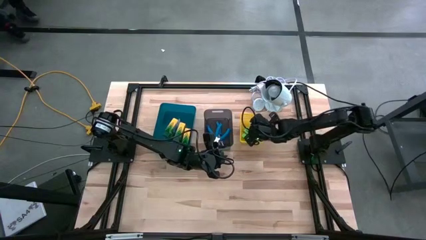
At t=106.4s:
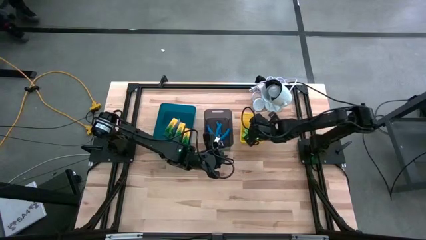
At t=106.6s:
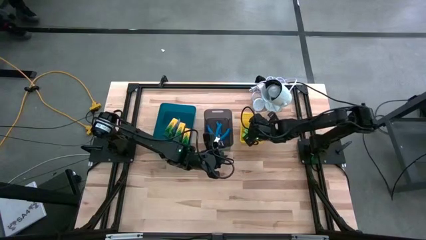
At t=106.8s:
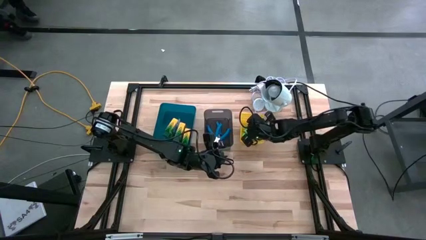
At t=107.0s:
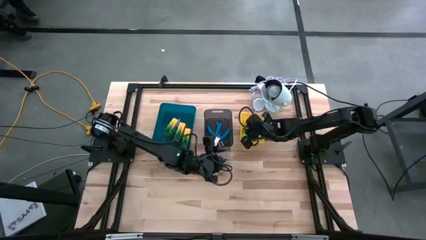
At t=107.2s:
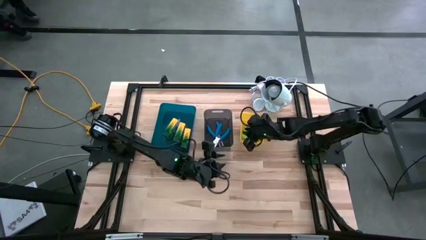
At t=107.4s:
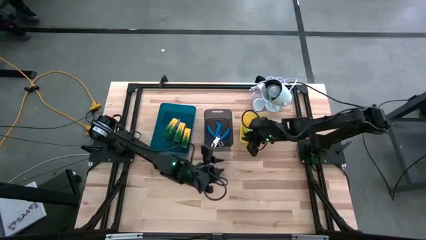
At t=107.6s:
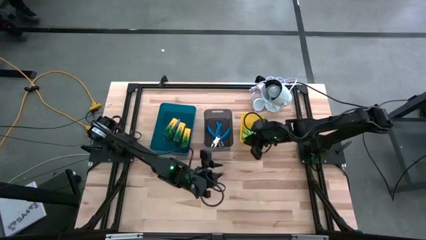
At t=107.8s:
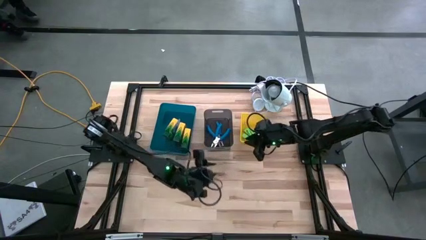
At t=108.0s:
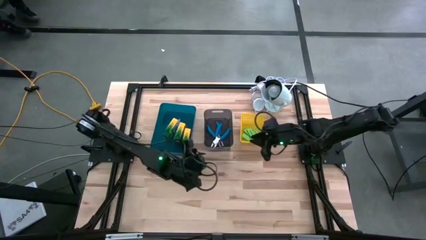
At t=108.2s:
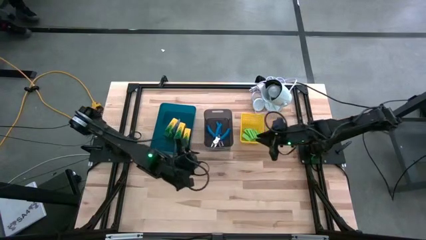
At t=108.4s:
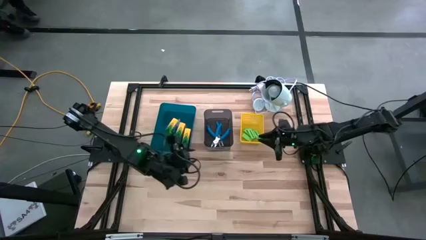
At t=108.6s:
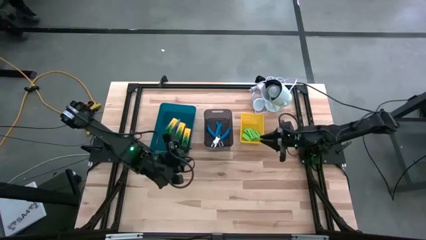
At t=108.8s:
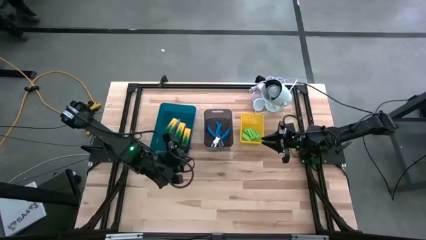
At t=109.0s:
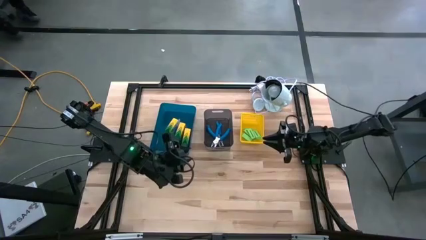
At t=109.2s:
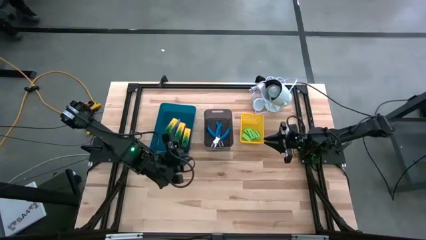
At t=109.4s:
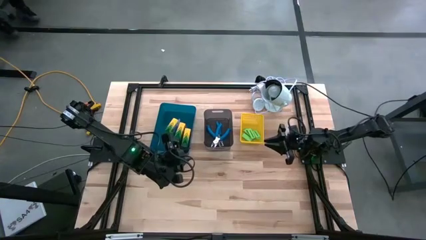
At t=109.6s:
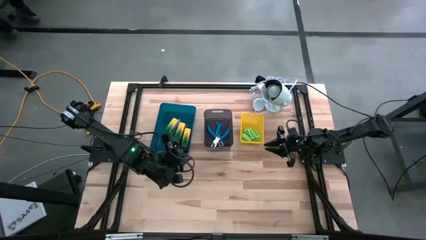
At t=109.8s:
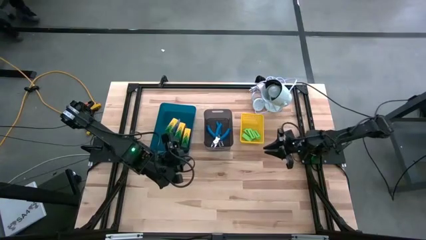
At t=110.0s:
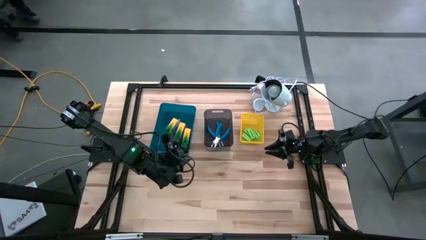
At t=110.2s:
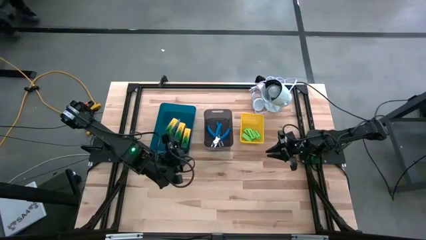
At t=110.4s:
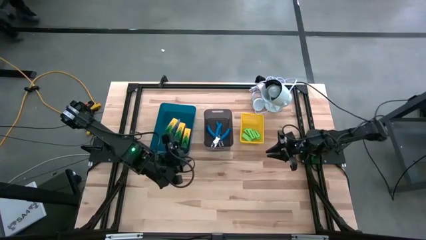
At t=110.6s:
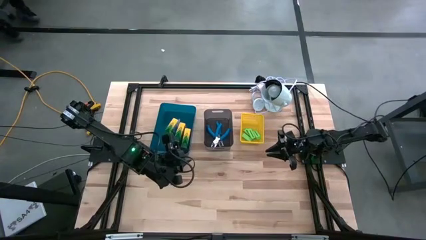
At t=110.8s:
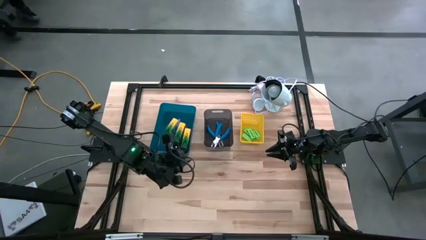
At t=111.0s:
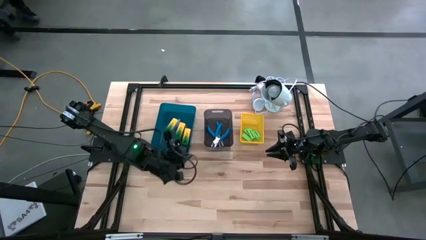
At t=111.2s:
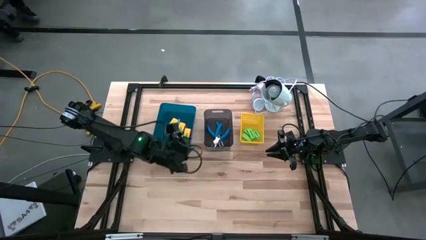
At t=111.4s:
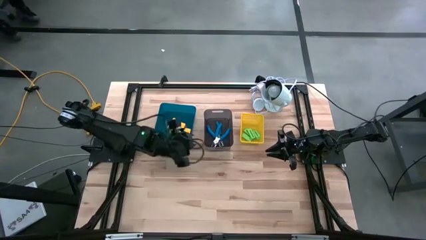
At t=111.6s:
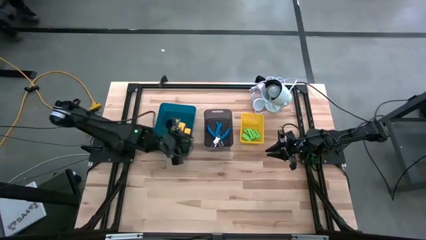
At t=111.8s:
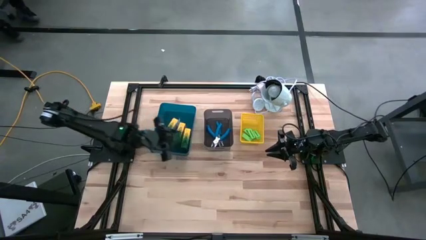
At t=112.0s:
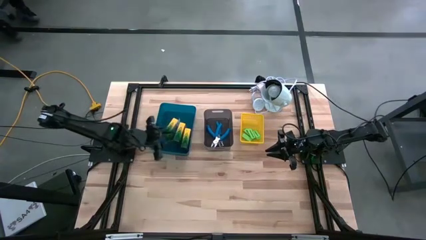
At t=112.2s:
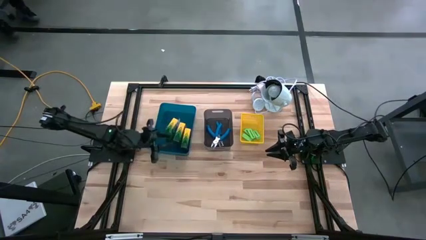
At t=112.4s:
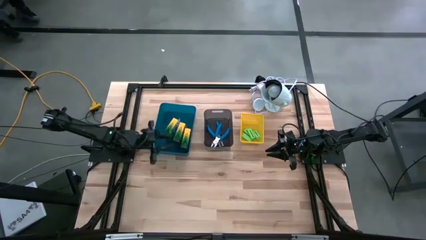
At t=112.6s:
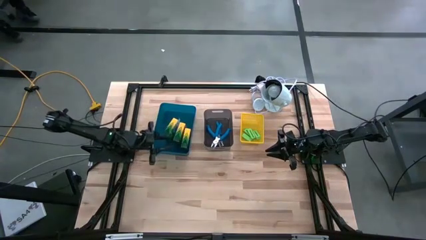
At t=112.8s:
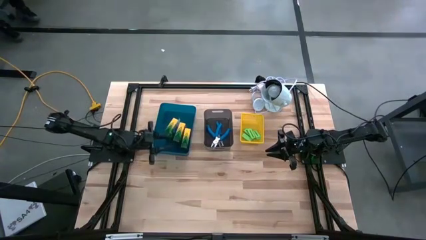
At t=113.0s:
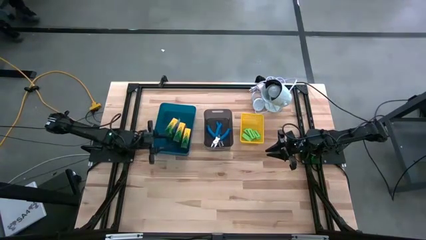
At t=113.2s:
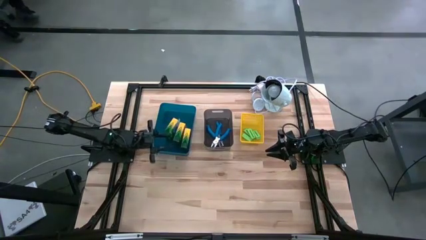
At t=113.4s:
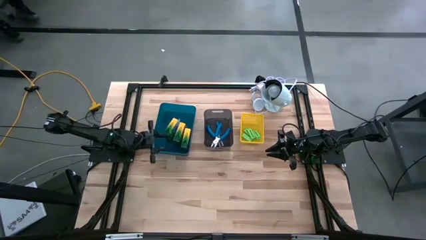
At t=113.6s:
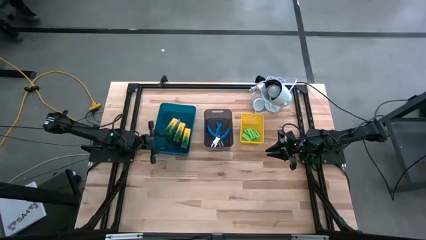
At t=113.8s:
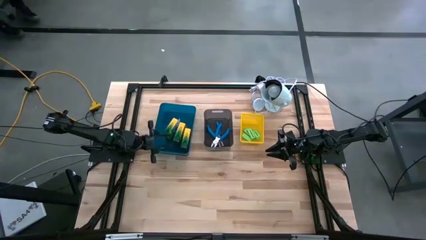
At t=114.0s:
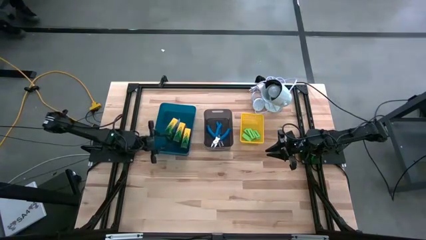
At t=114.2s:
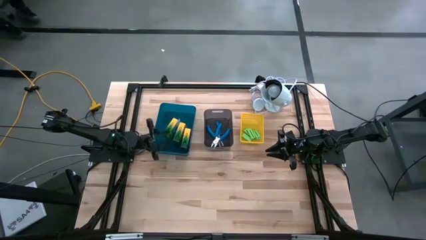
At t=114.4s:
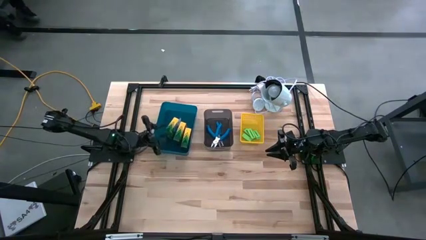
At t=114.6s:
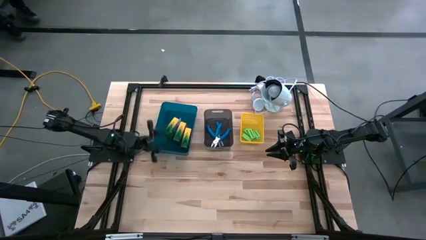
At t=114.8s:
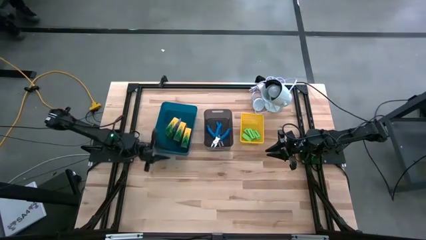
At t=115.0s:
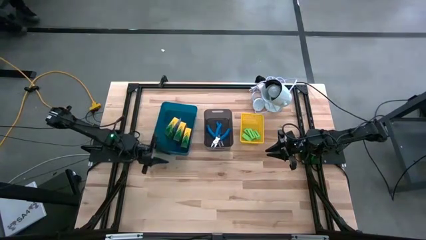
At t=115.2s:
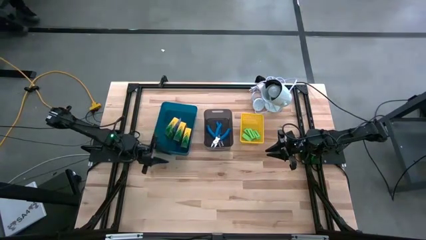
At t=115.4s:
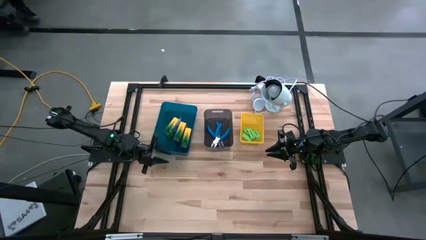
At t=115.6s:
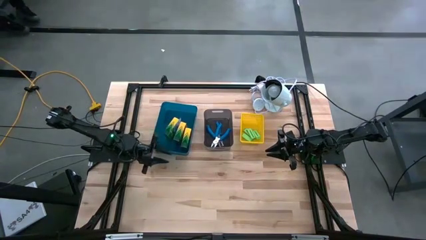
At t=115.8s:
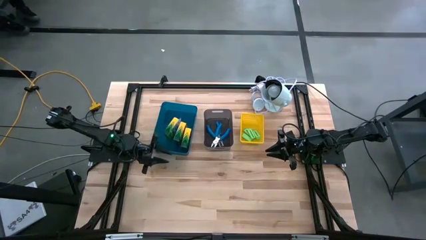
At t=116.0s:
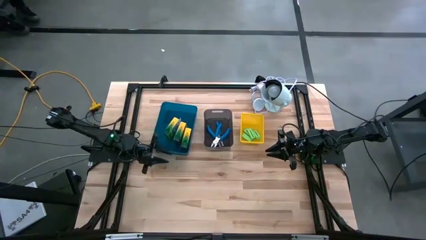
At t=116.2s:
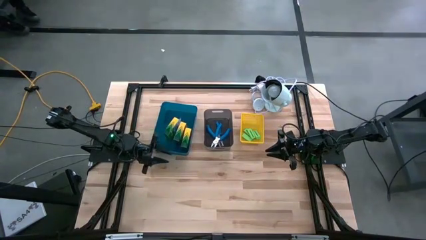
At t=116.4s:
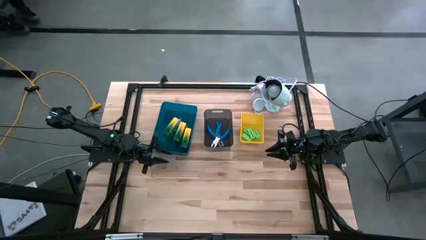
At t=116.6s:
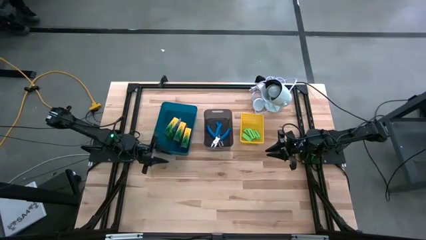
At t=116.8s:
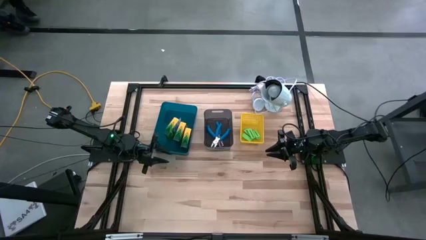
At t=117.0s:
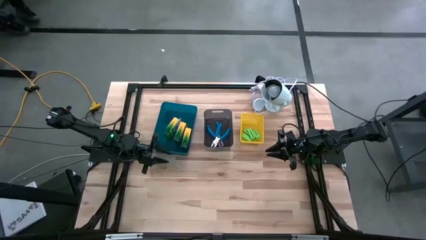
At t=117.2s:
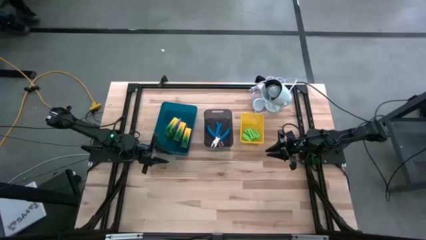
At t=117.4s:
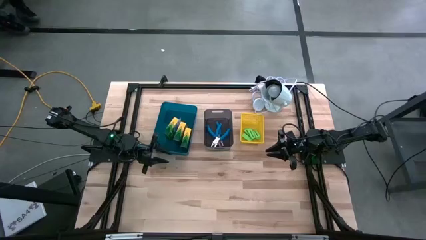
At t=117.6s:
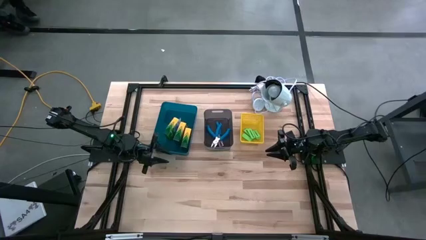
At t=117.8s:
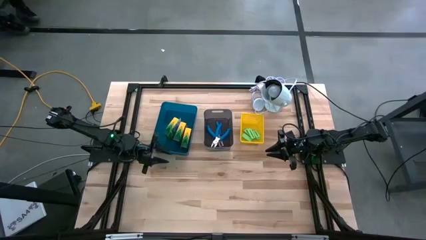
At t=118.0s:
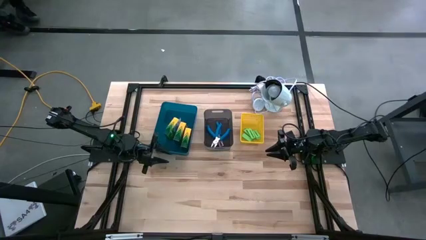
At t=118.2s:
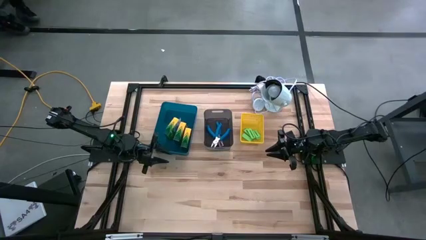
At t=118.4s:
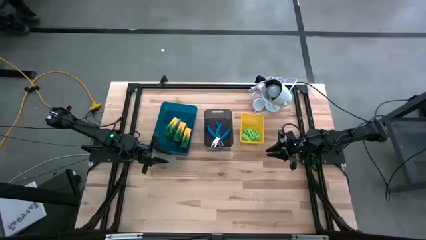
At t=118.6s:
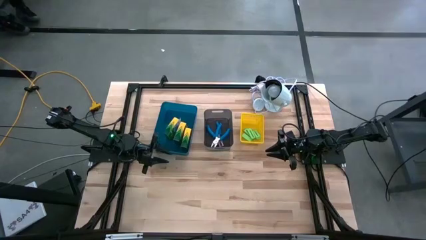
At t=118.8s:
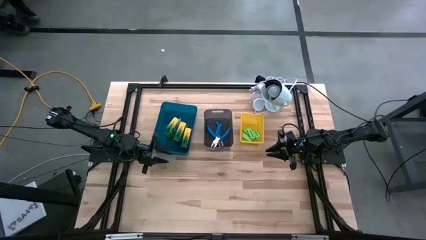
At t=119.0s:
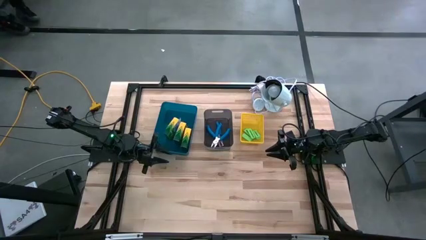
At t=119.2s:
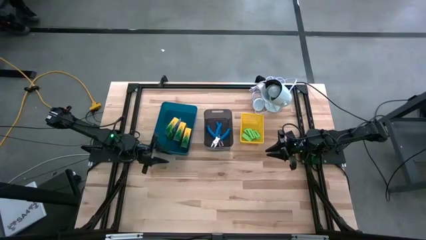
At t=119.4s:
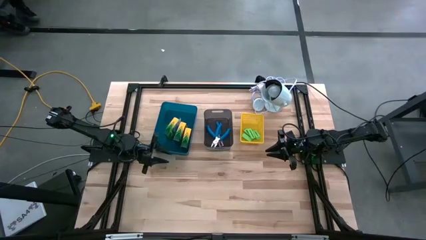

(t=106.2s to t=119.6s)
Task: Pick & Place School Supplies
Return to Home Position
